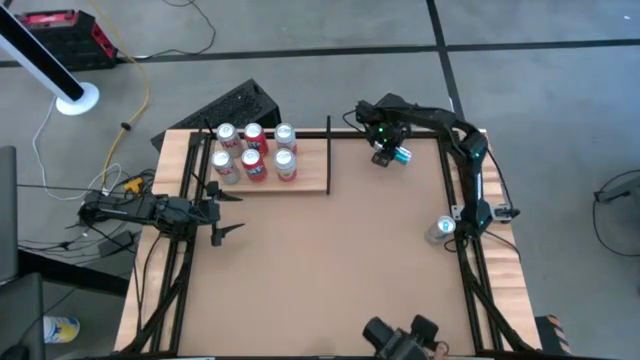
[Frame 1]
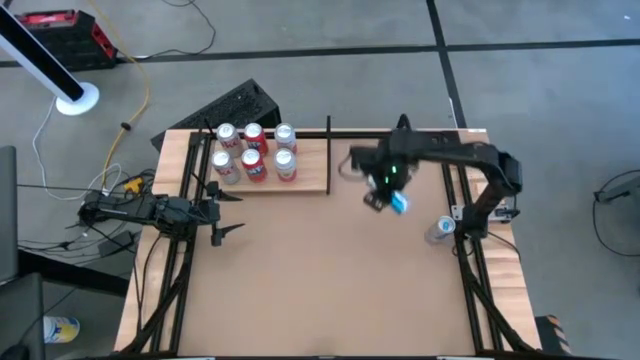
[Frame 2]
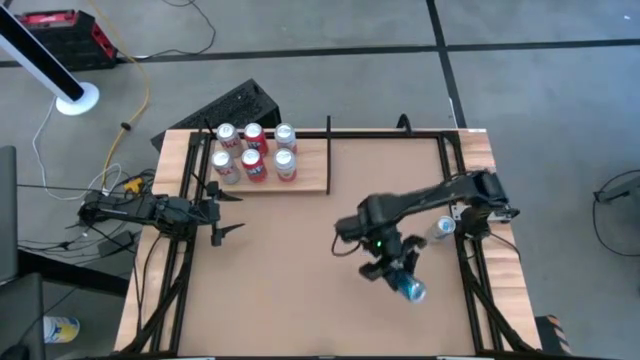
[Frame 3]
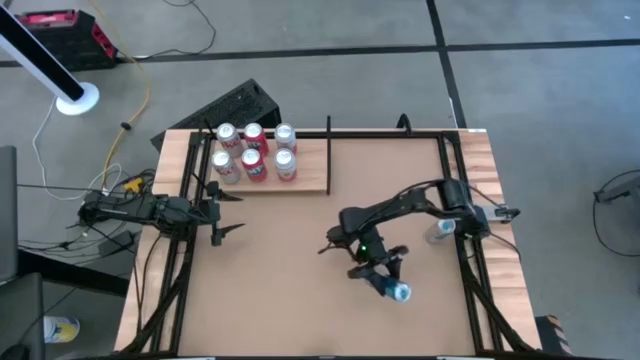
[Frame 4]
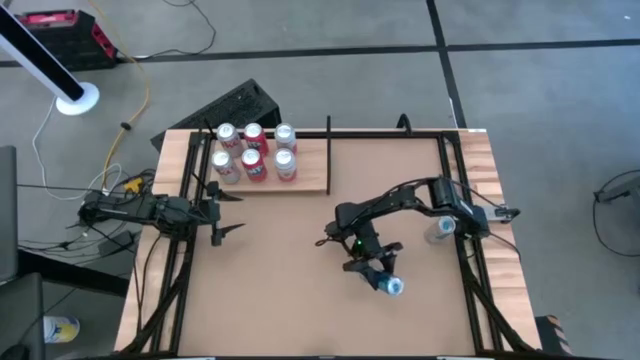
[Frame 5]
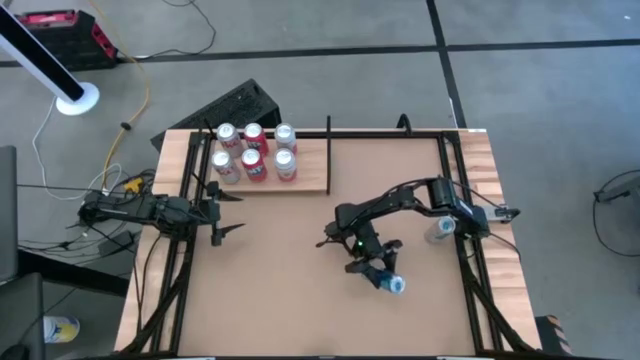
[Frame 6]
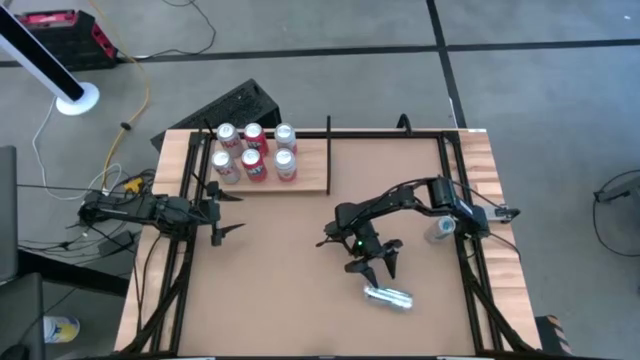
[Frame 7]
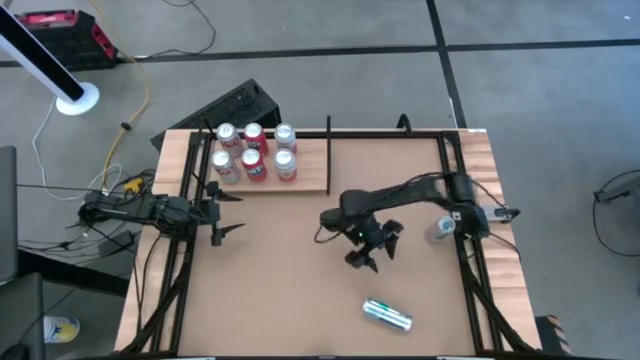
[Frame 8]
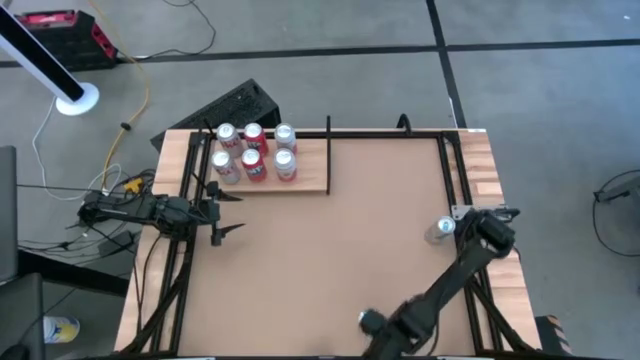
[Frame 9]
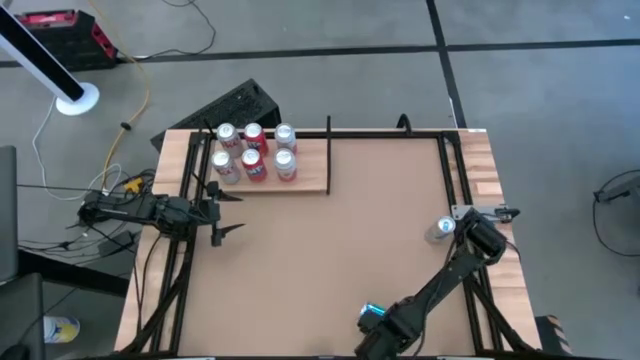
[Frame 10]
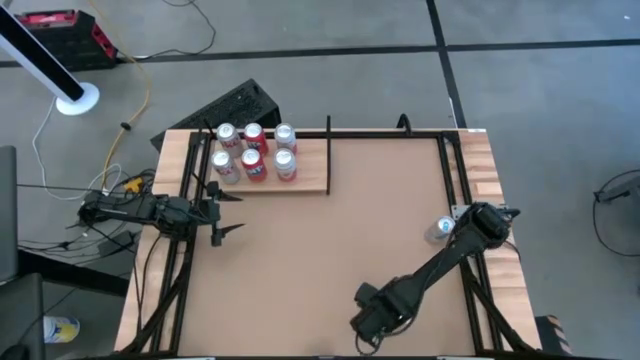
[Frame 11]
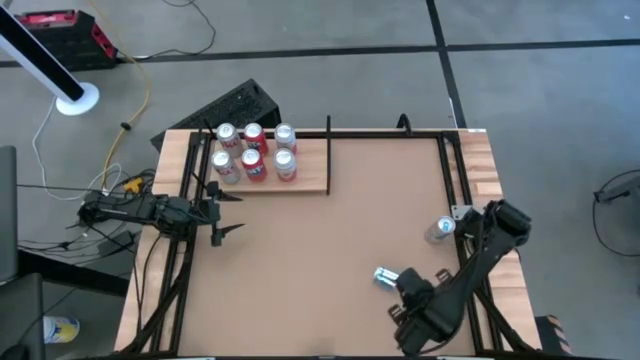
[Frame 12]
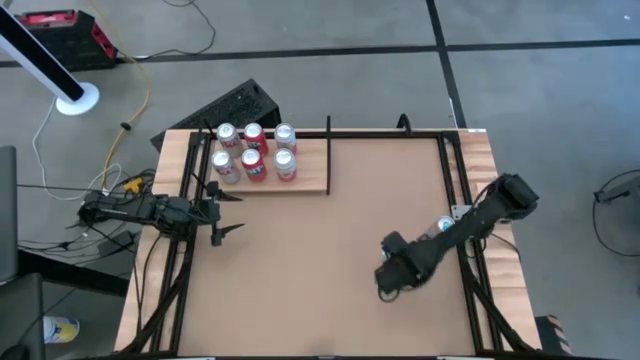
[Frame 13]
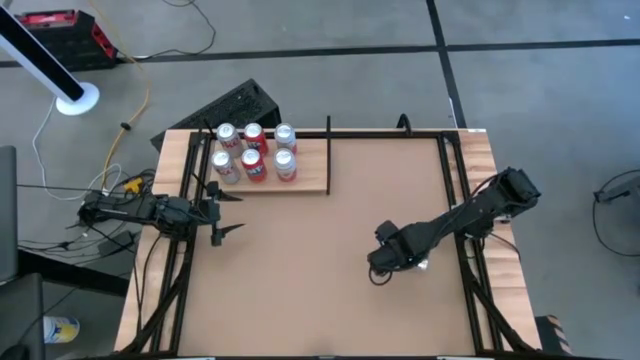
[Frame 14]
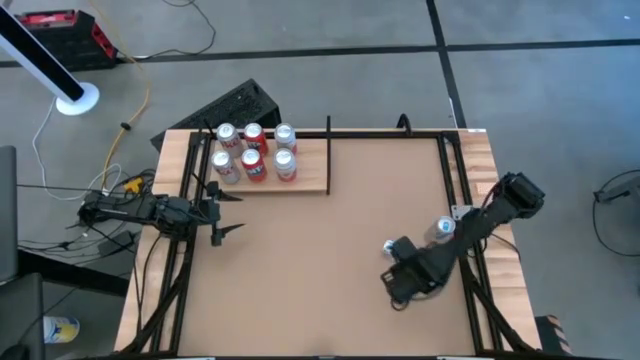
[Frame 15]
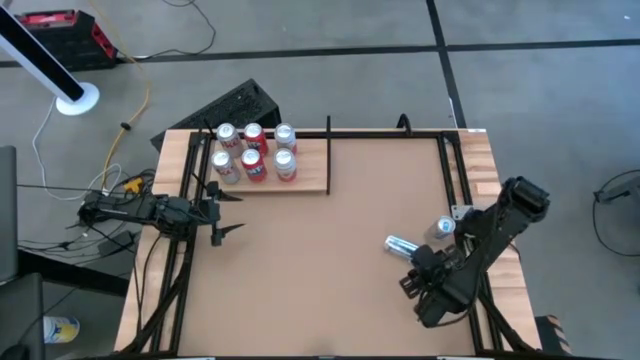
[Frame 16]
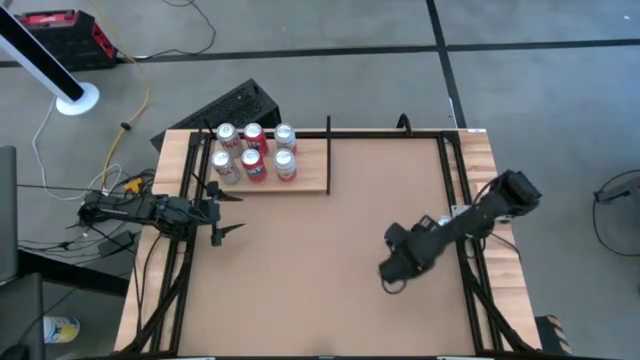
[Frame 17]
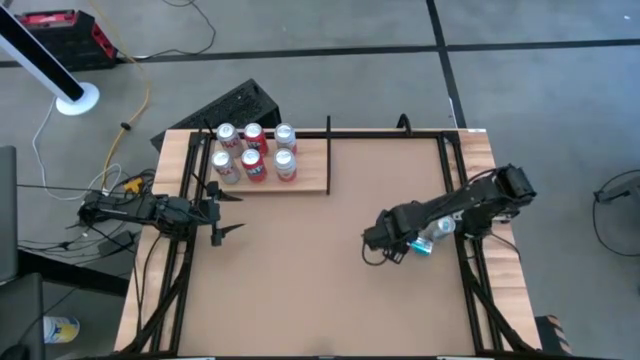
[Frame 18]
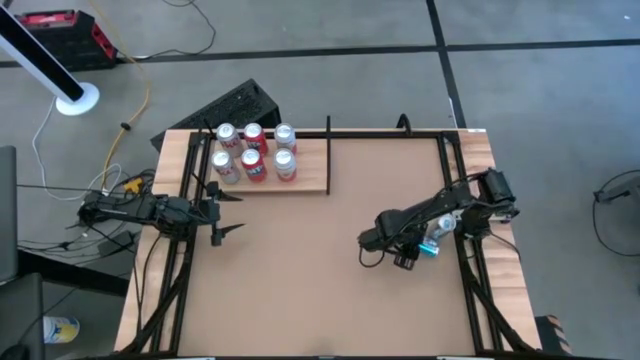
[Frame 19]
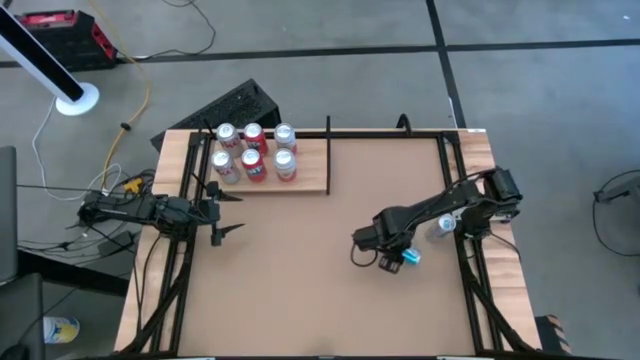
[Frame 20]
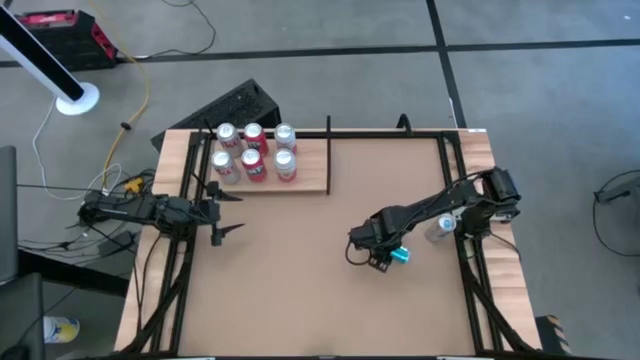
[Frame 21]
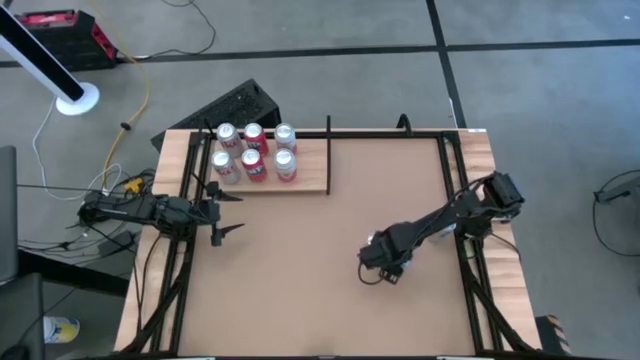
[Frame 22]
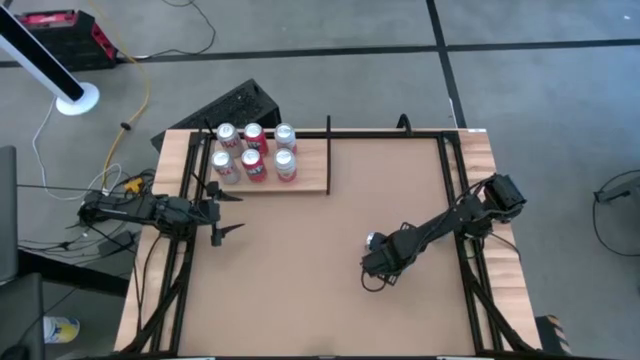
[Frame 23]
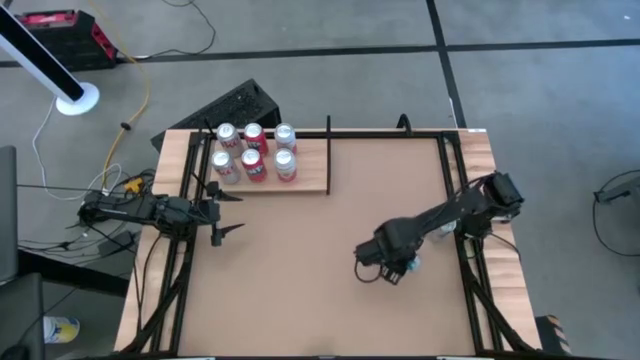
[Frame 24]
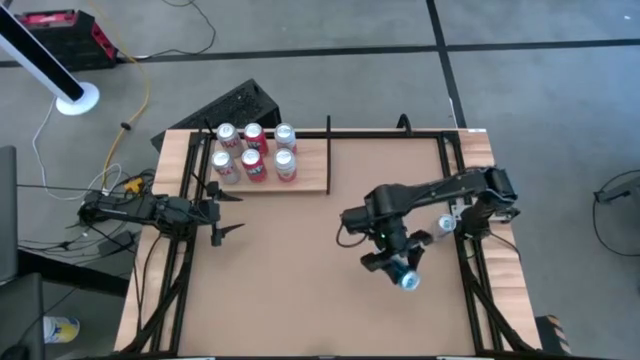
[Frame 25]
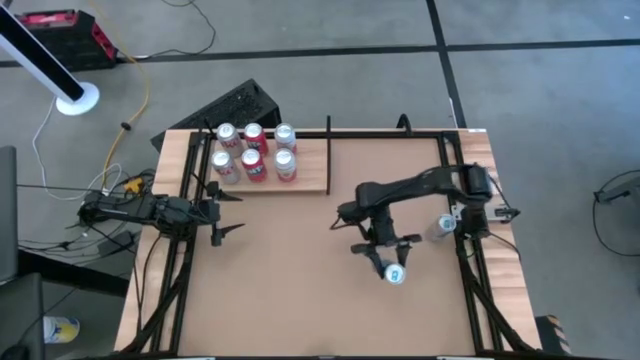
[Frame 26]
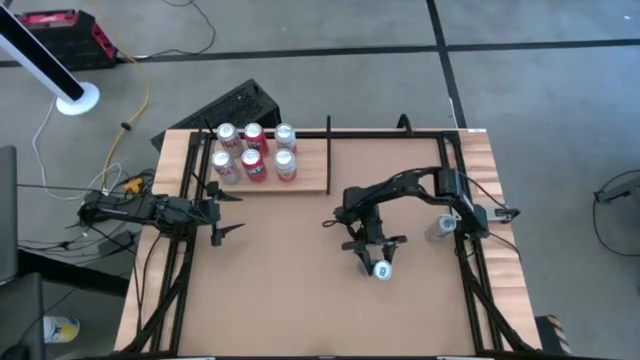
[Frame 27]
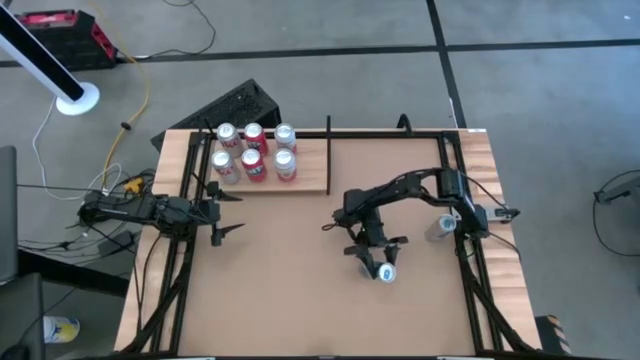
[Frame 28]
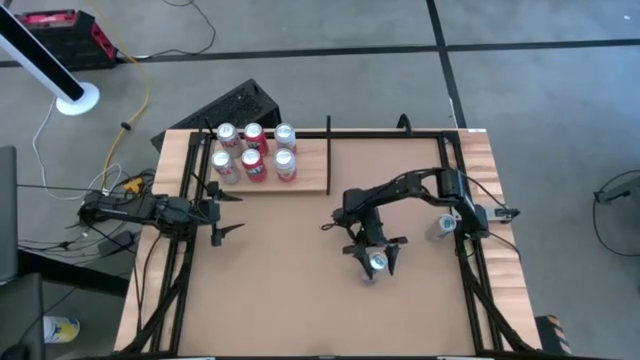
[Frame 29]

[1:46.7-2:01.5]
Task: Place canned beverage on shelf
Put the bottom blue soda can on the shelf

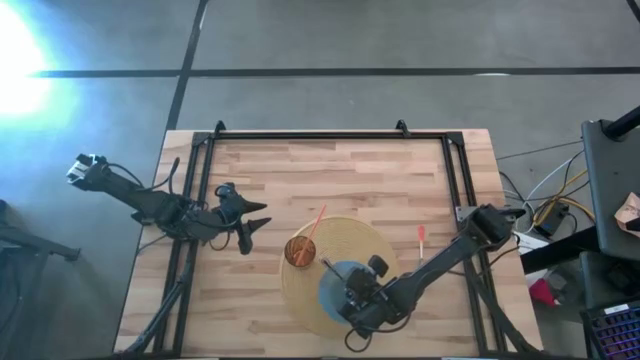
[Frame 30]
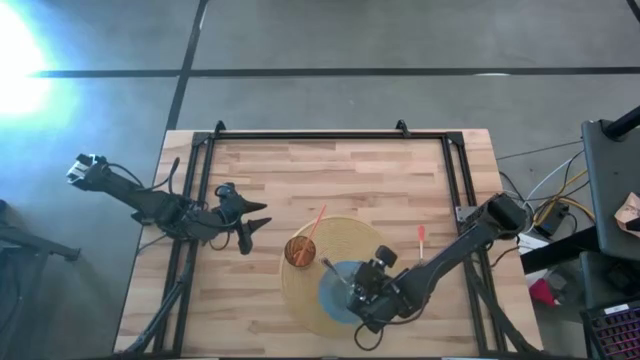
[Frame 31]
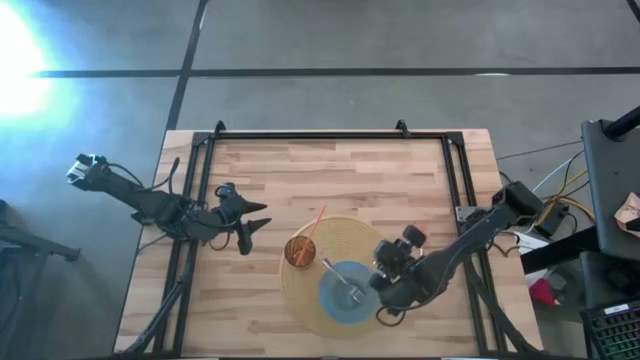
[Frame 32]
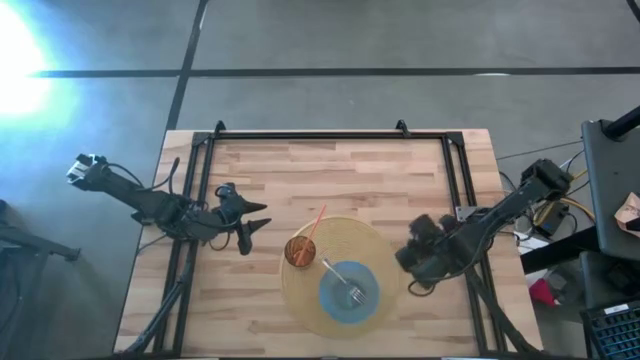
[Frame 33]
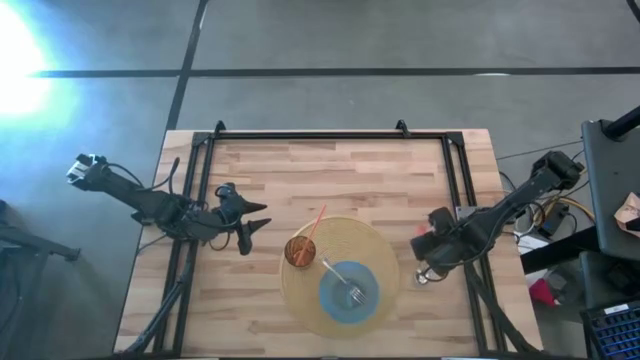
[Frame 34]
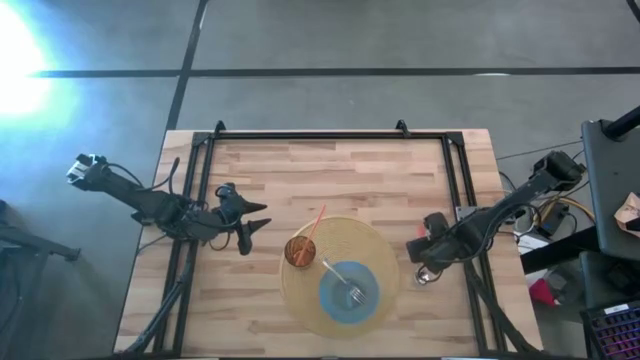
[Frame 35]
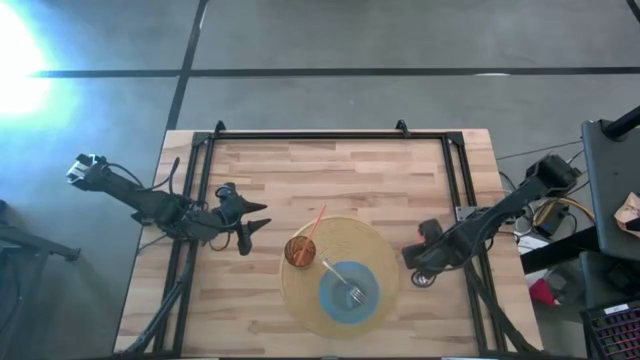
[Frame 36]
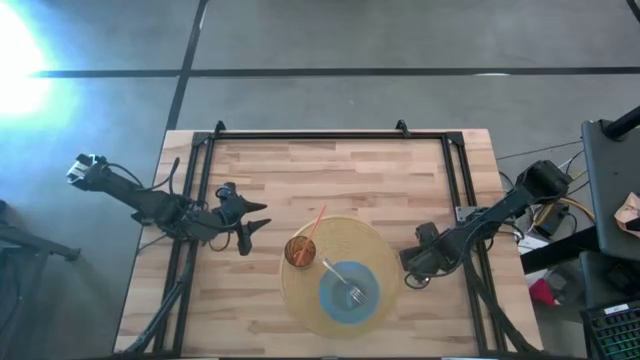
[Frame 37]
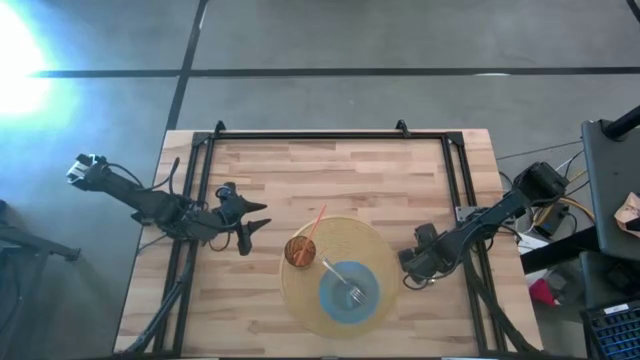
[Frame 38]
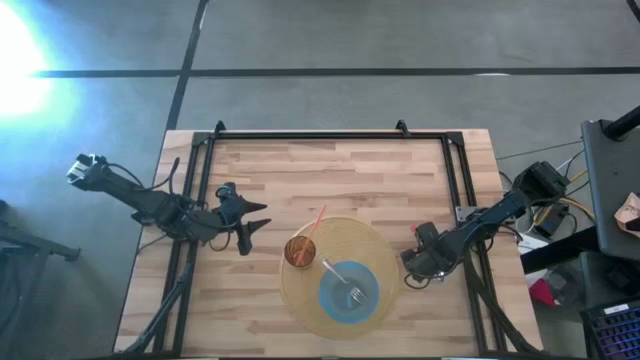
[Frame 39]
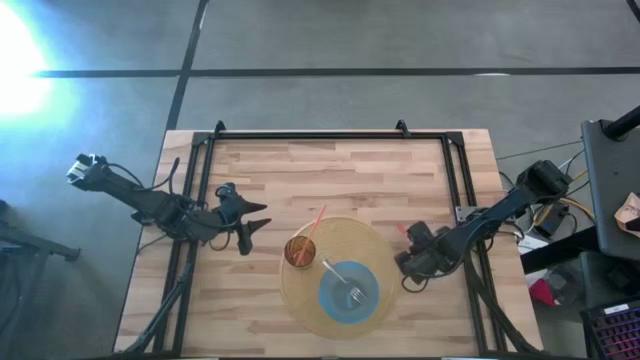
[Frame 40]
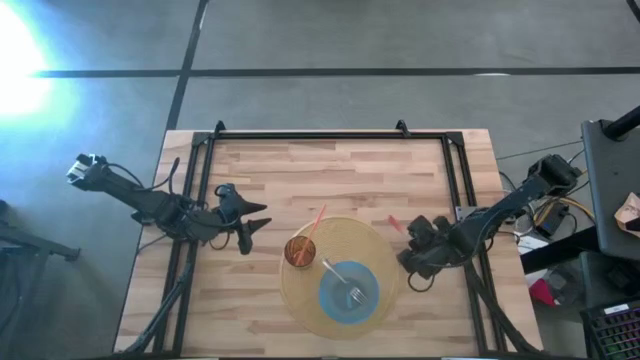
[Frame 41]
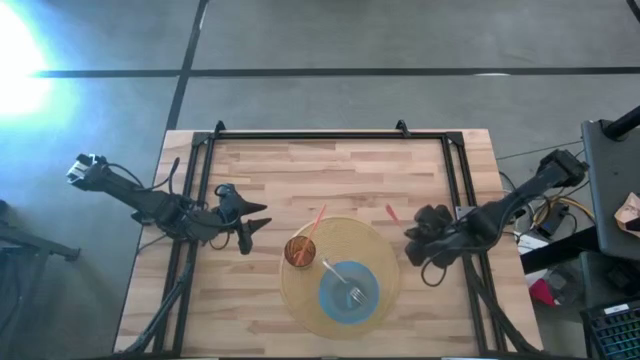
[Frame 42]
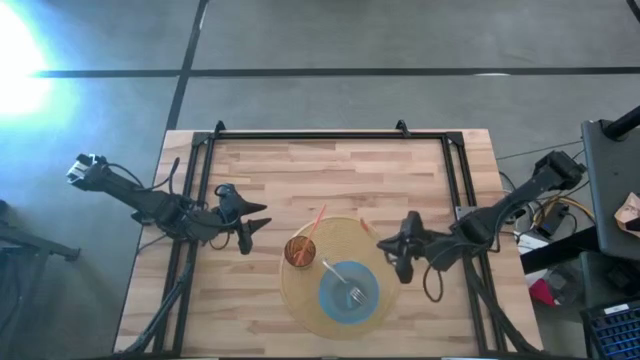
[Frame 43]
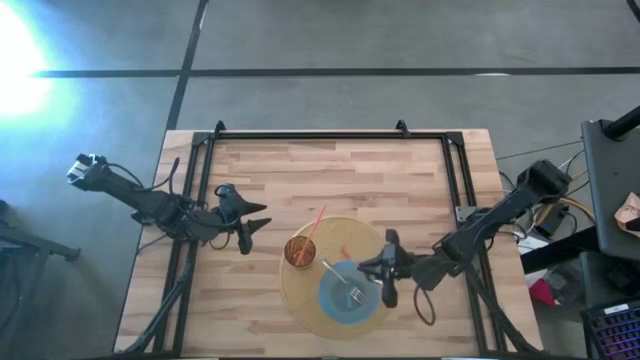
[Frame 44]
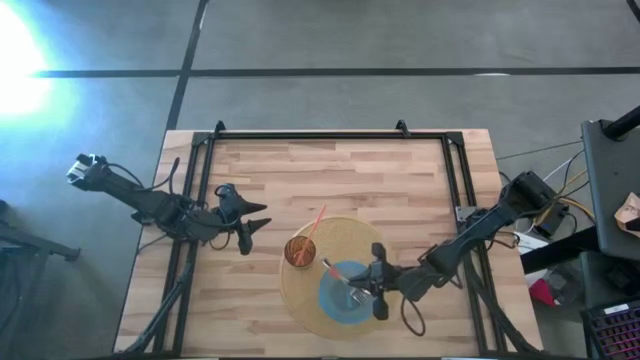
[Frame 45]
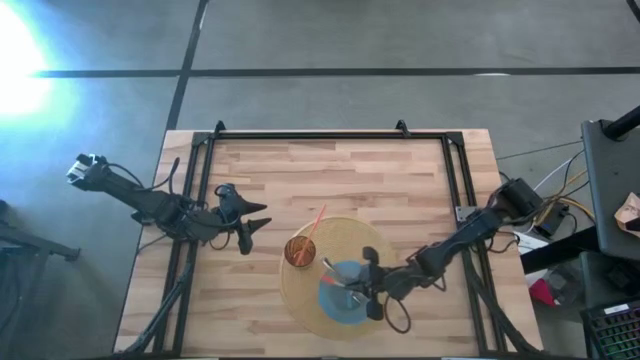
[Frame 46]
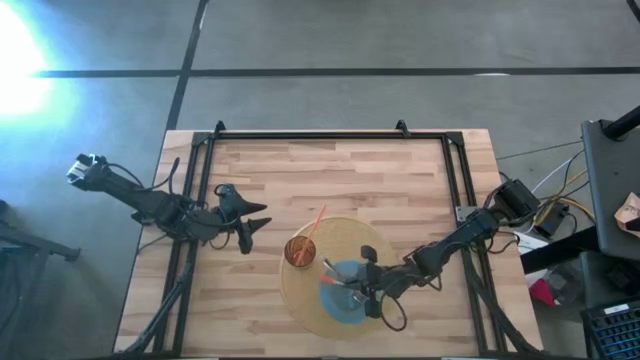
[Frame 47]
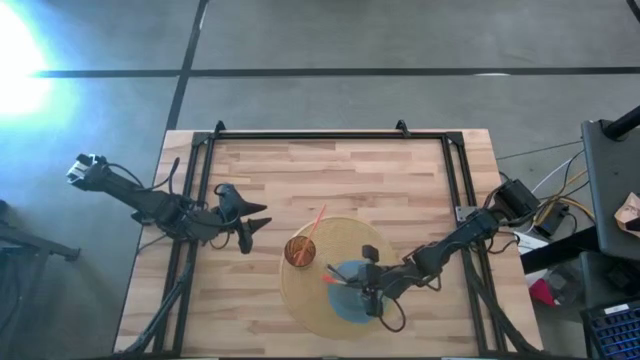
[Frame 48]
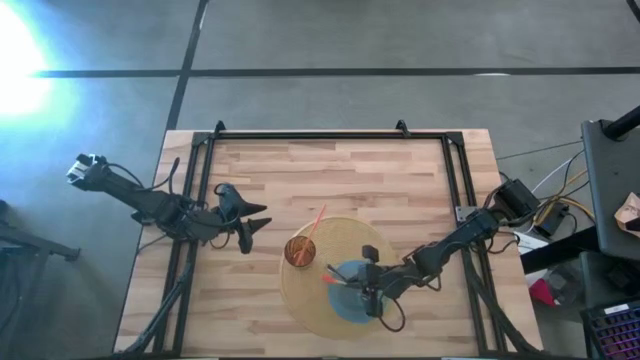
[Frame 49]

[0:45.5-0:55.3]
Task: Pick & Place Utensil
Put the orange spoon into the blue bowl
